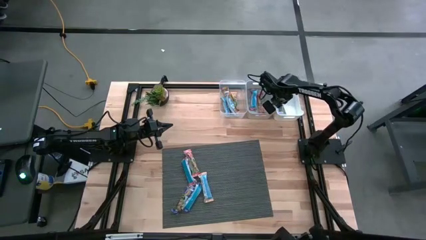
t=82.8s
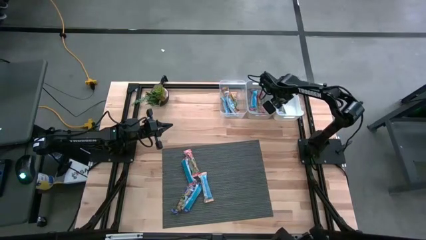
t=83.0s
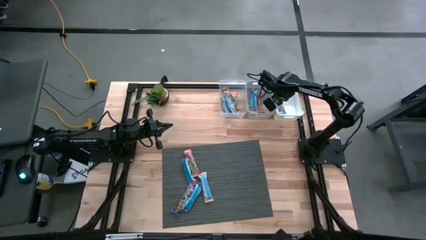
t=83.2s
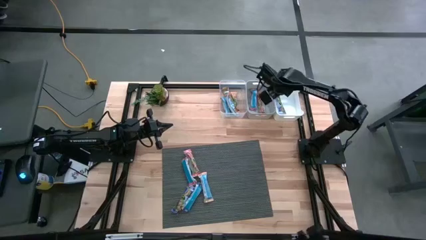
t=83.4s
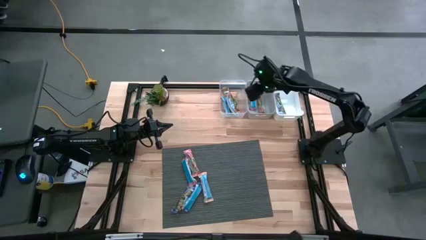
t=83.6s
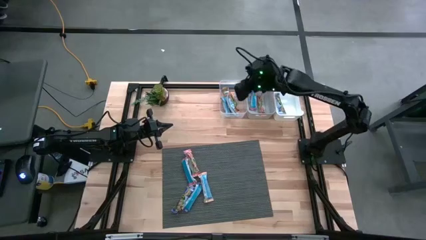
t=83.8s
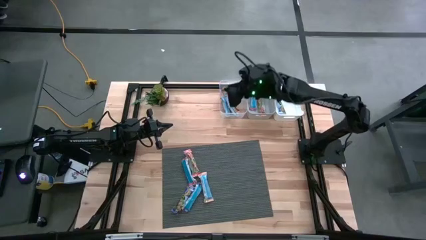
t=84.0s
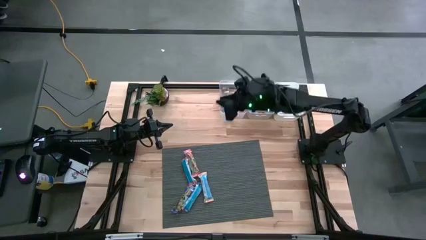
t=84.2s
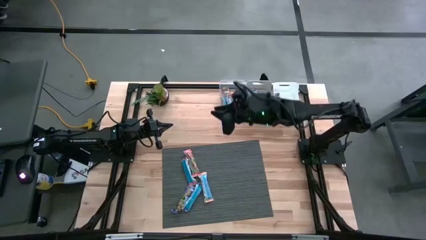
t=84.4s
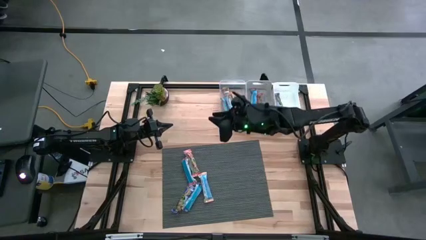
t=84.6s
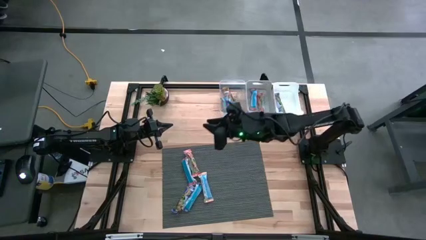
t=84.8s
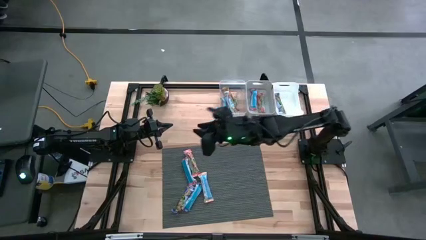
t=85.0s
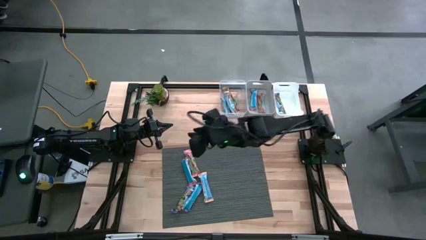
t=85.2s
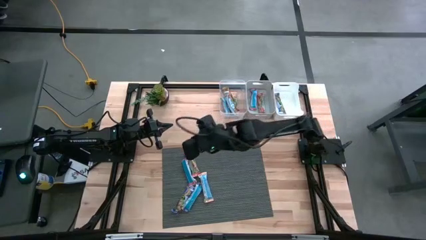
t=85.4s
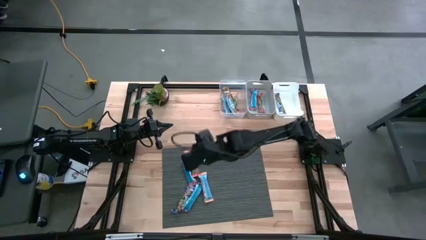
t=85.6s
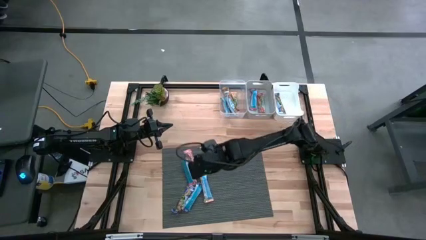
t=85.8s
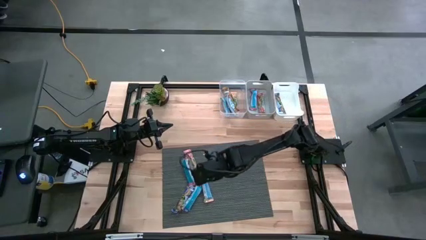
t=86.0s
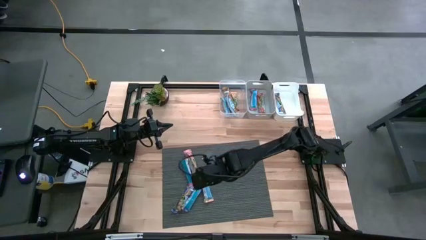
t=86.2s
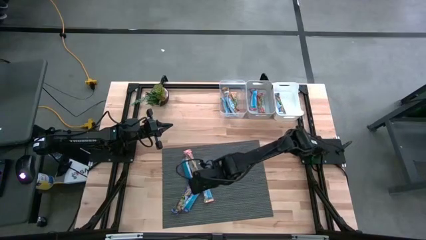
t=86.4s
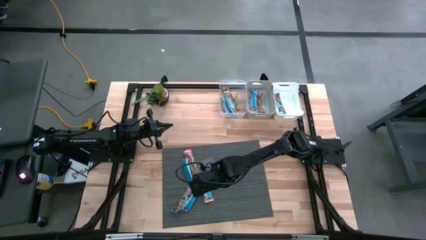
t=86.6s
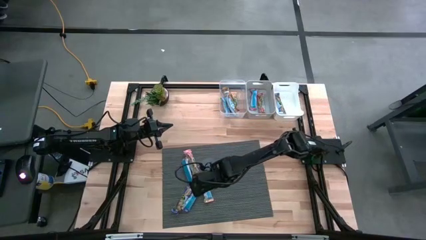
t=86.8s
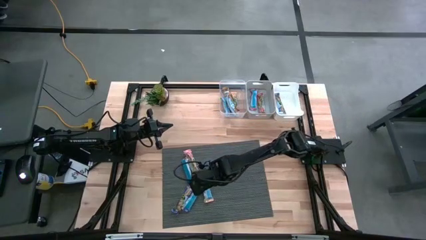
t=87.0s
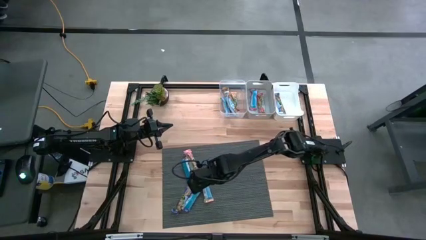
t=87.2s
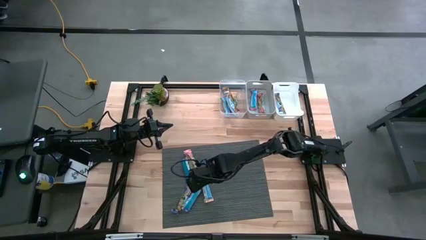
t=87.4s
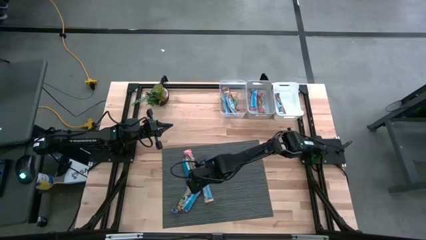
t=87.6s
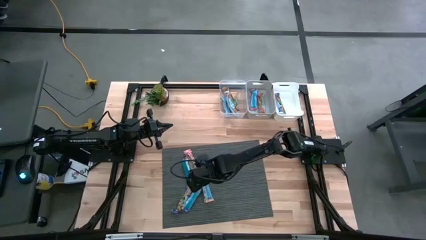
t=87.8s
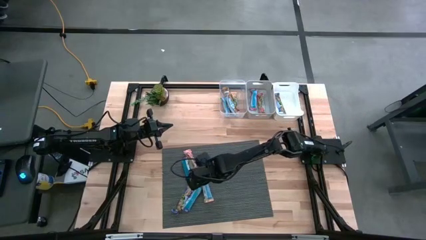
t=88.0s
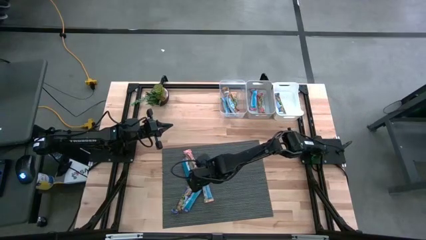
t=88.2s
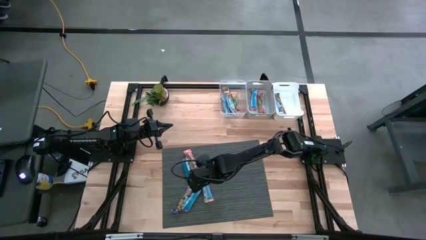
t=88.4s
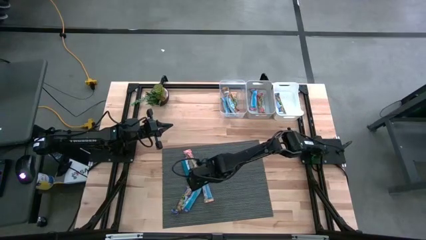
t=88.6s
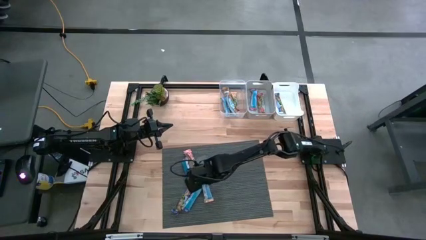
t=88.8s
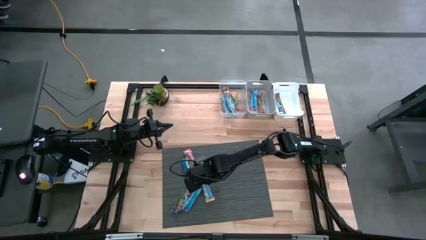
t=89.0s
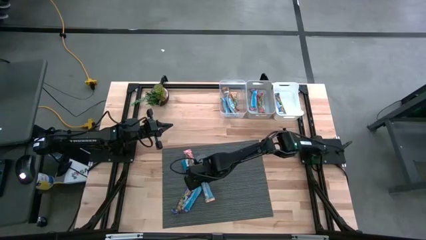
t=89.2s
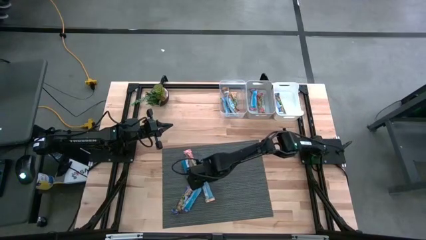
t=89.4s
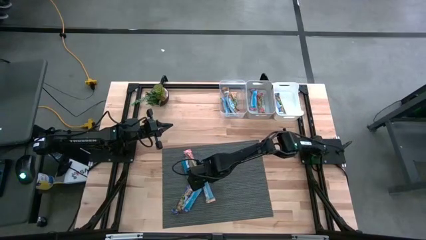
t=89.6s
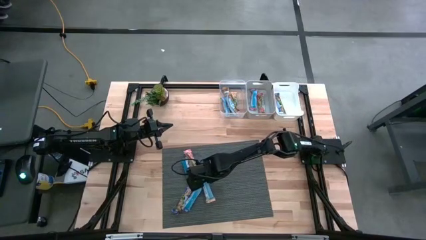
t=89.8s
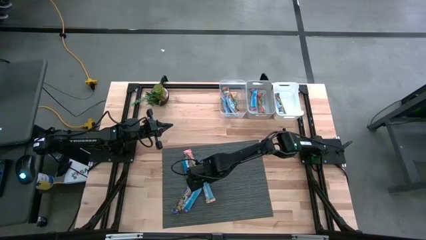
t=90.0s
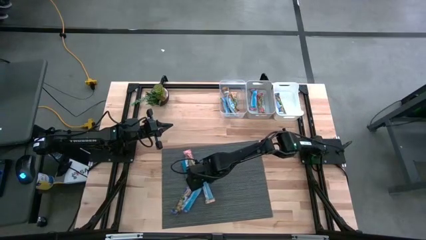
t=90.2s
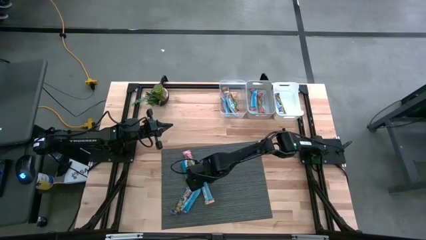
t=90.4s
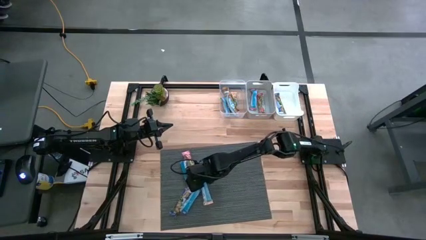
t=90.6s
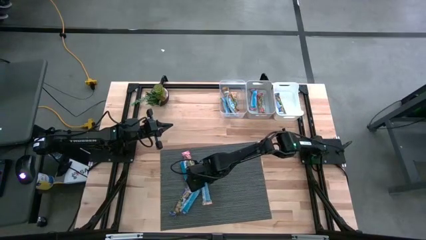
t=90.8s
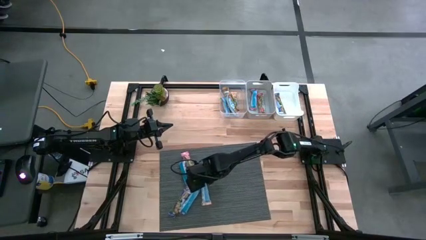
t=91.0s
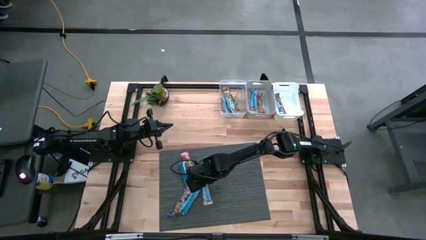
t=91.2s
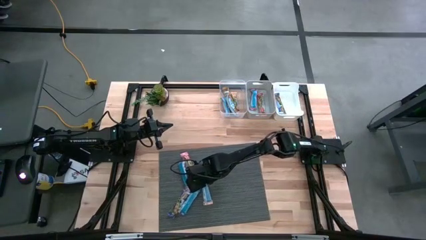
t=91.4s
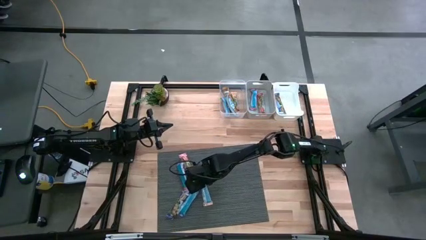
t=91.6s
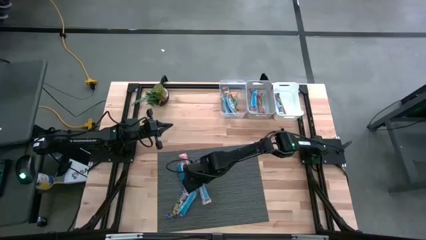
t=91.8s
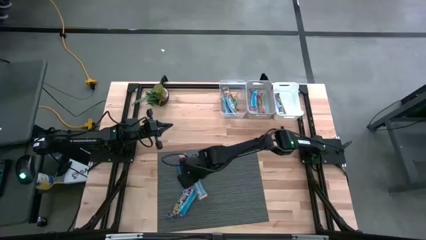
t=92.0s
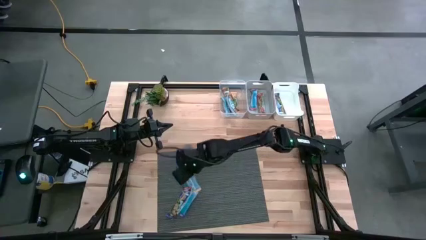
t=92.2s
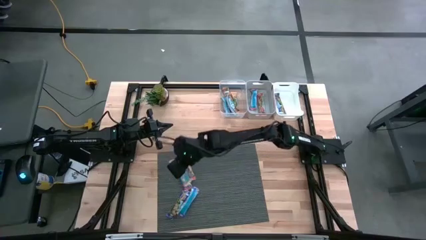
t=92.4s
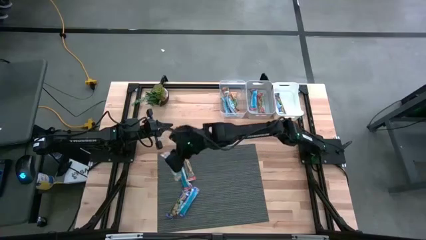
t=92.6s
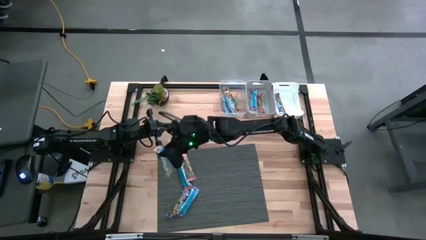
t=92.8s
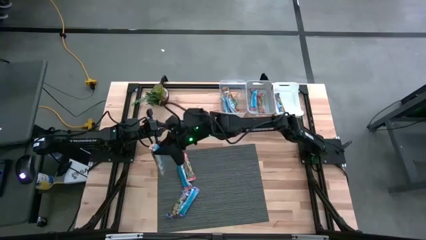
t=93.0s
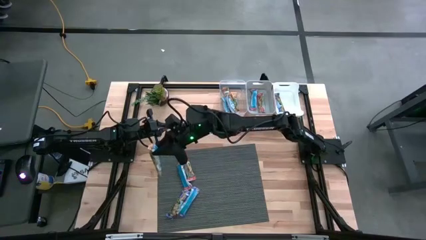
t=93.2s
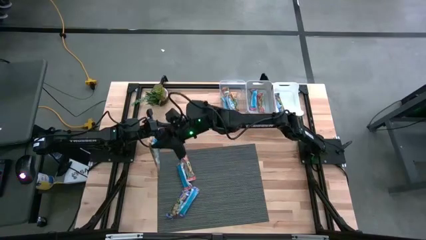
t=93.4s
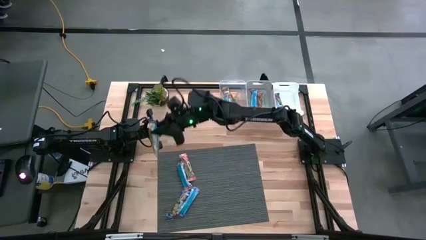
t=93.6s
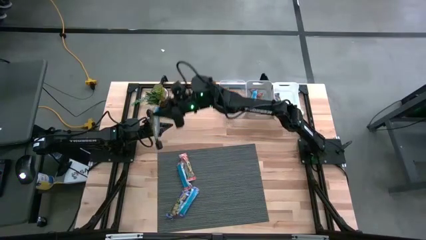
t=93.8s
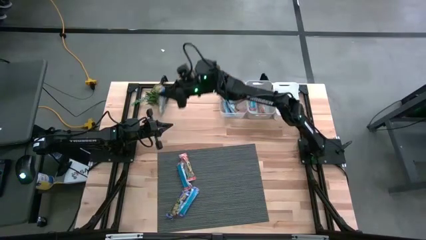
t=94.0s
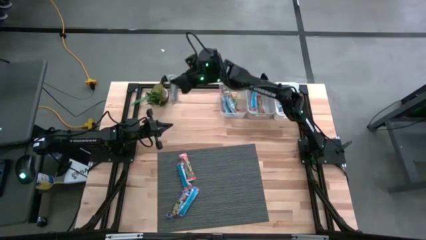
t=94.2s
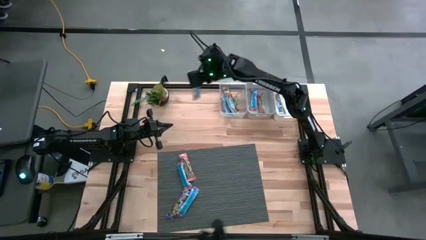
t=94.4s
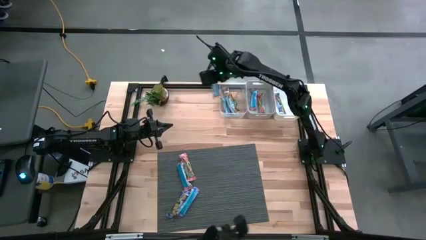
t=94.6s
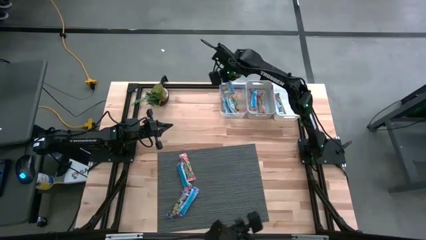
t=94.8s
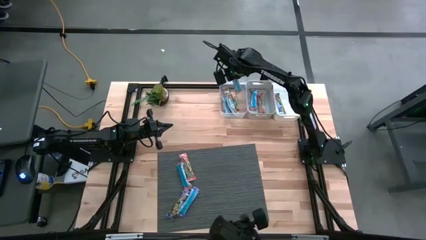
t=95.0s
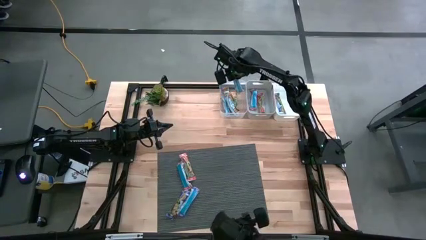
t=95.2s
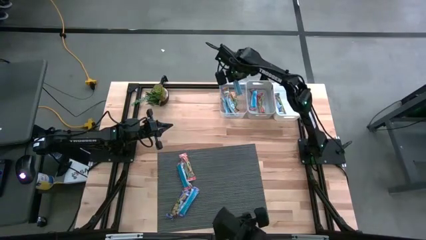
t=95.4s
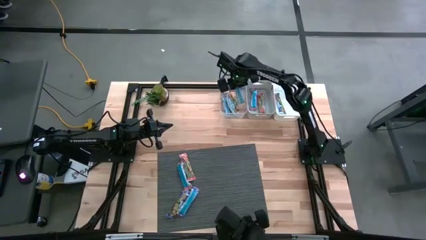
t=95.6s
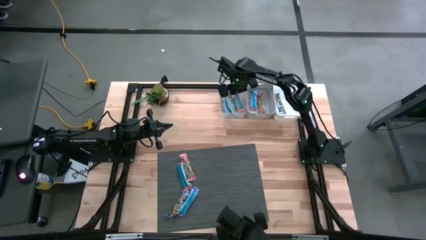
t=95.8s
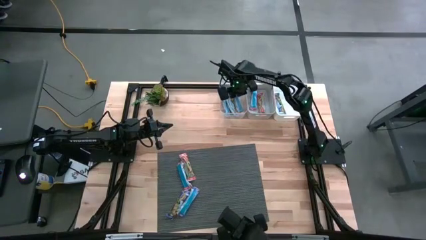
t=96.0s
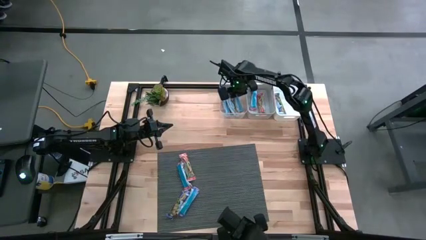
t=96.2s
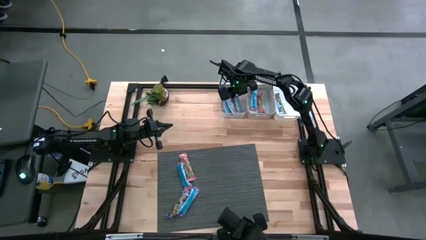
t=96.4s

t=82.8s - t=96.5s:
Task: Pick and place Granola Bars by type
Put the yellow granola bar into the transparent bin

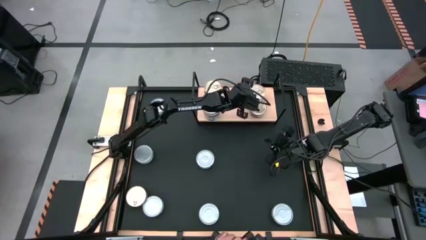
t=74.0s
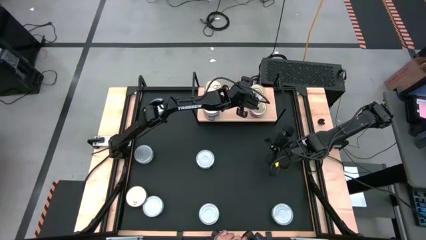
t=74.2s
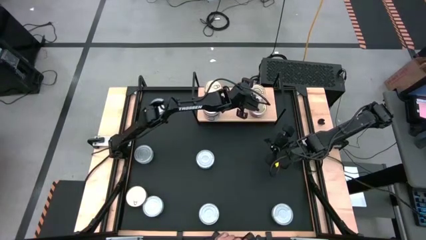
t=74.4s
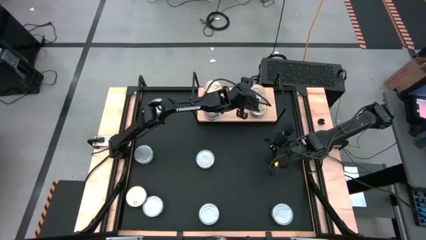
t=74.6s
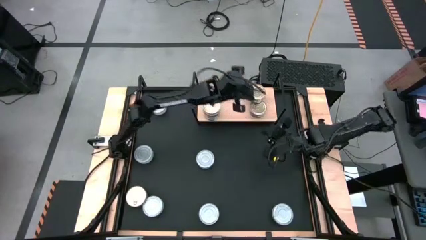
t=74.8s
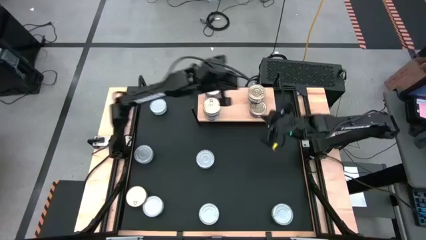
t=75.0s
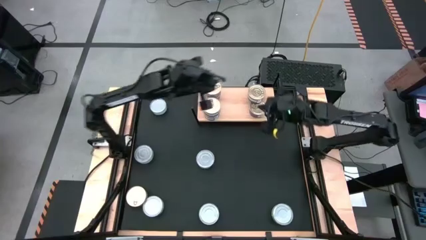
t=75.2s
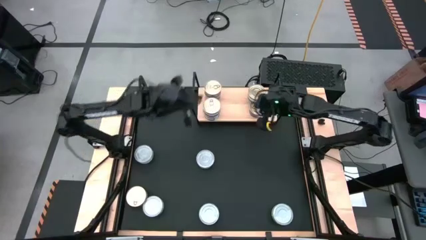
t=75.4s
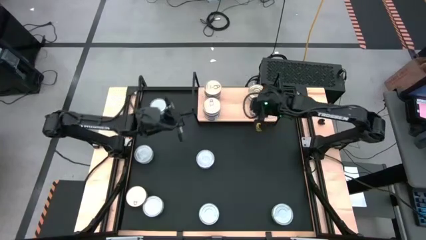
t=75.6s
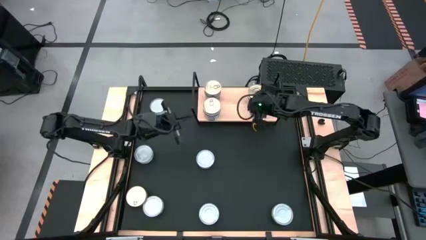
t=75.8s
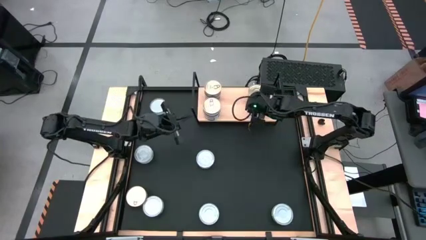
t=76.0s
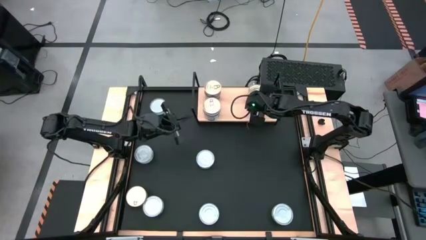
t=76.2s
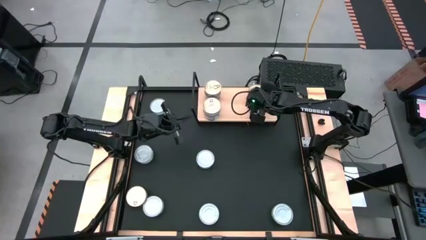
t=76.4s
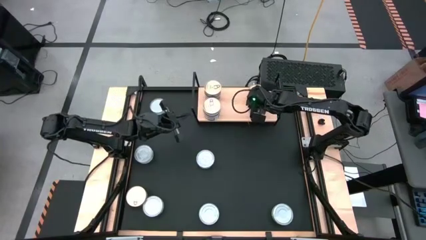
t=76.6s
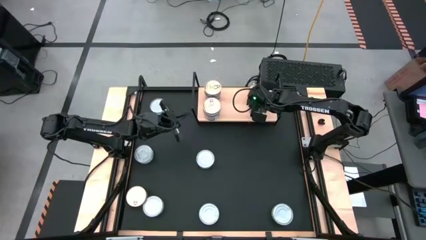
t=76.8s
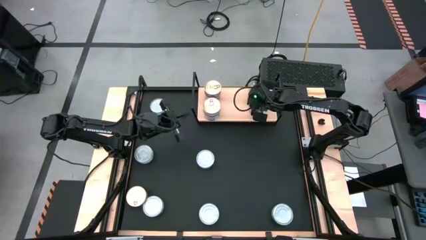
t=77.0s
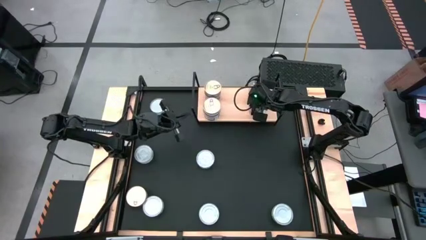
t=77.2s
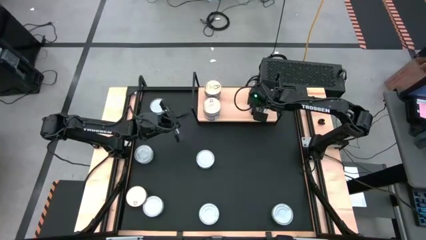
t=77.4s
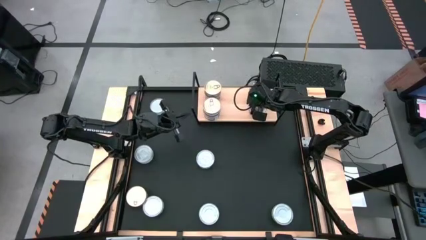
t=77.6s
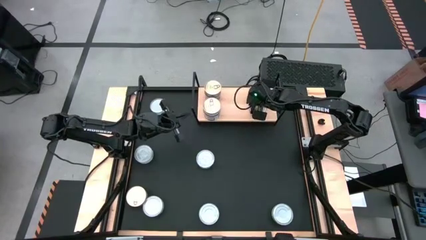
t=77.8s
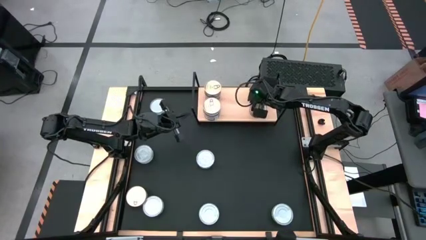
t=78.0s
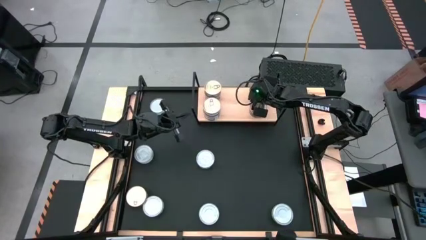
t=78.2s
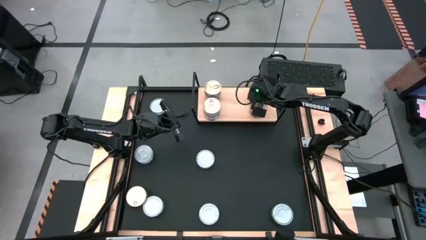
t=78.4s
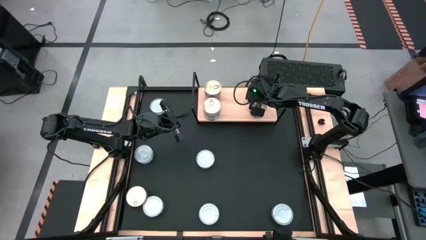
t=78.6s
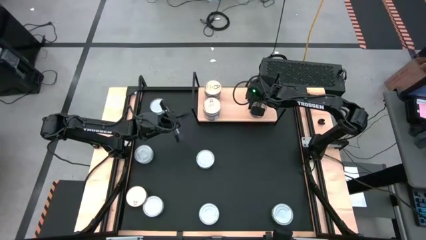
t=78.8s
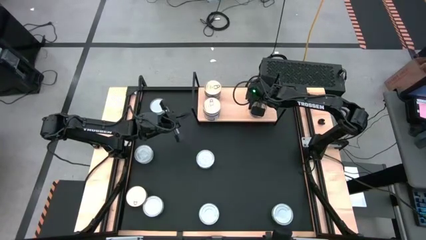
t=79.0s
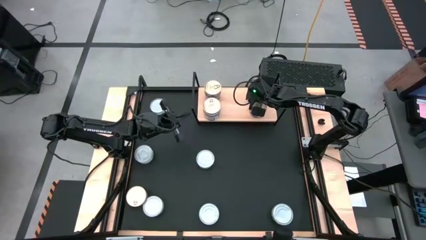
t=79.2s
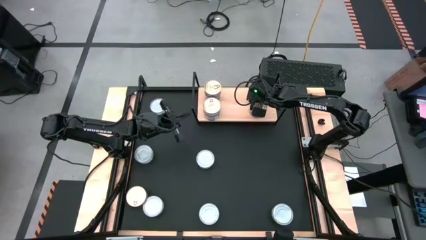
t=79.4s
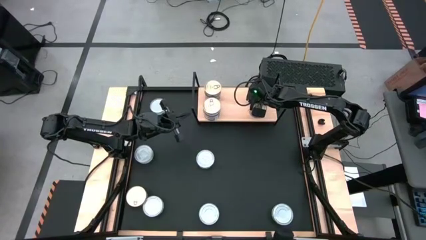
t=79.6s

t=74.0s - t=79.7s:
Task: Stack canned seafood by type on shelf
Stack the blue pink tuna can on top of the other blue pink tuna can on the shelf
